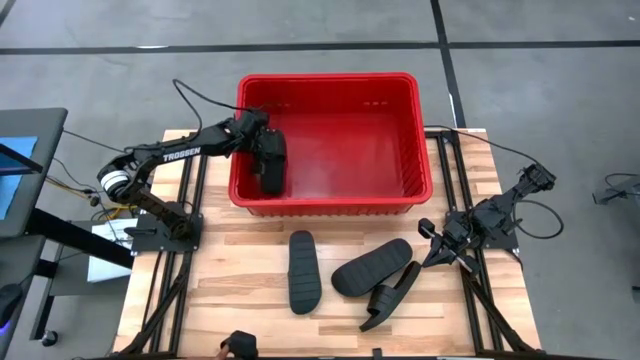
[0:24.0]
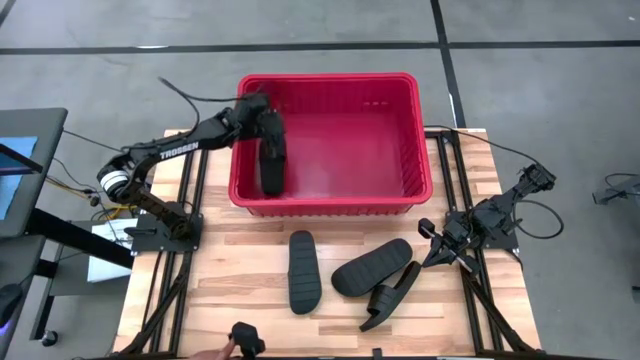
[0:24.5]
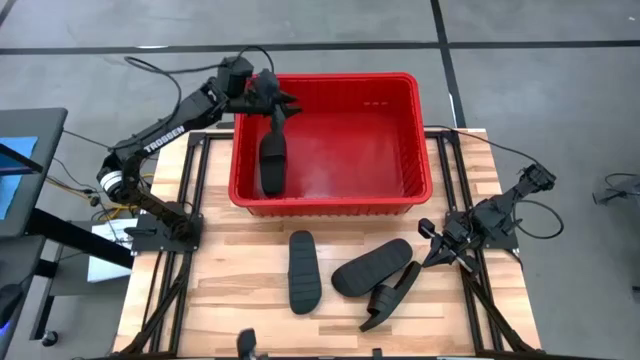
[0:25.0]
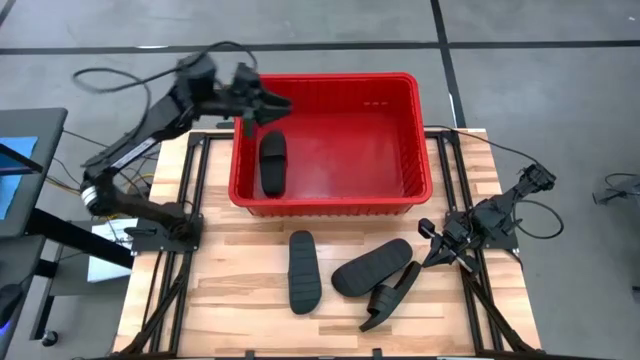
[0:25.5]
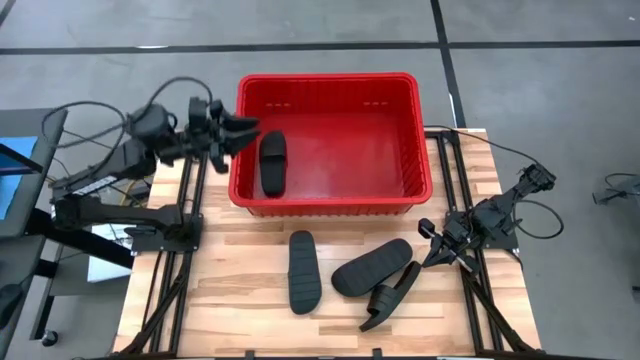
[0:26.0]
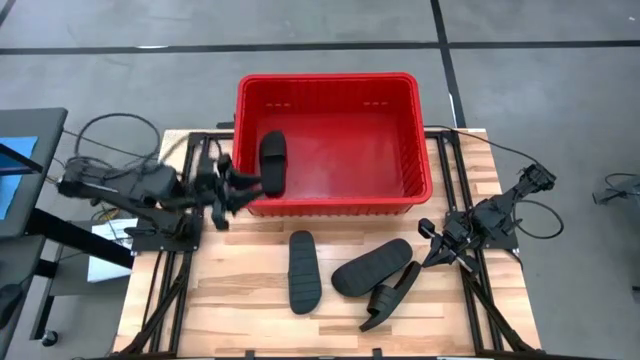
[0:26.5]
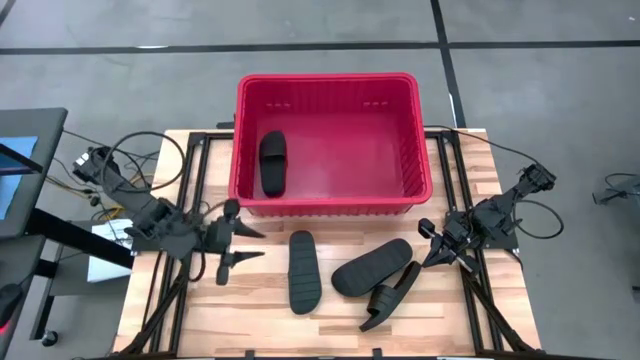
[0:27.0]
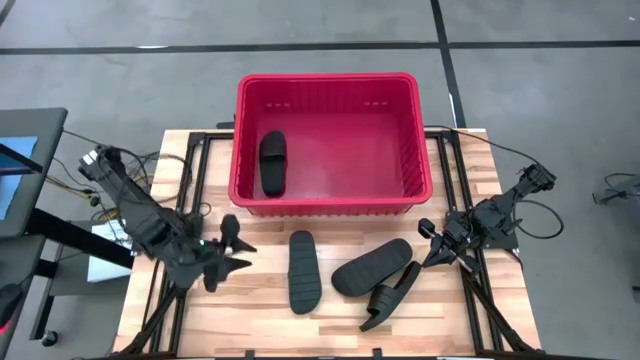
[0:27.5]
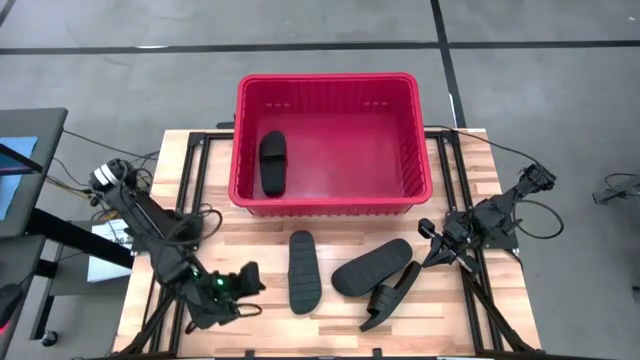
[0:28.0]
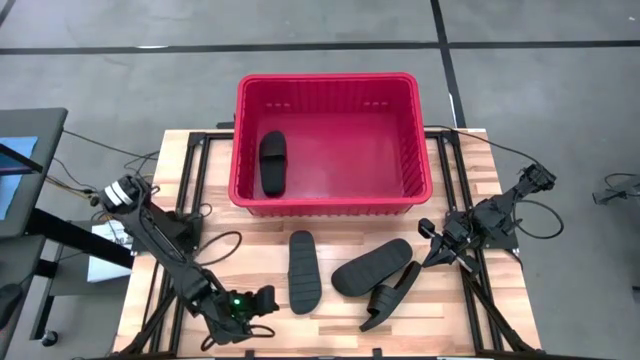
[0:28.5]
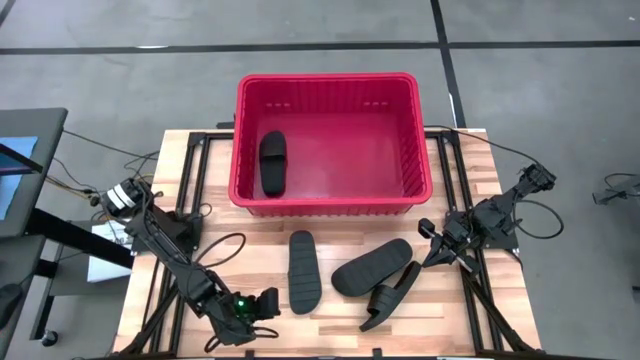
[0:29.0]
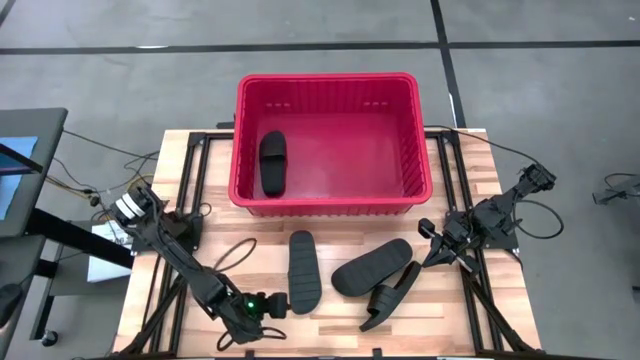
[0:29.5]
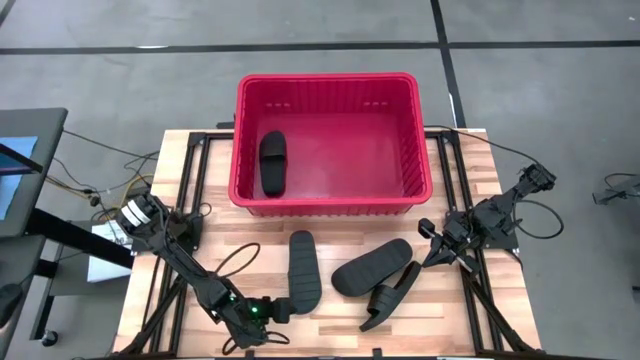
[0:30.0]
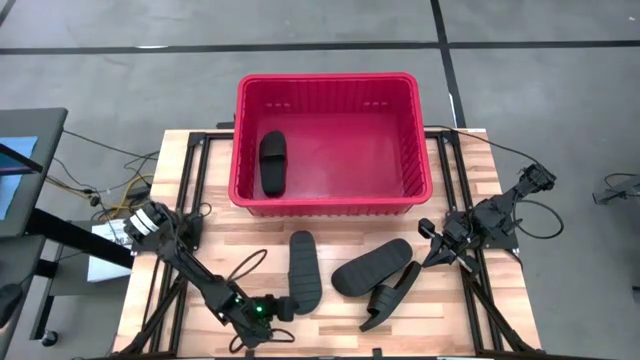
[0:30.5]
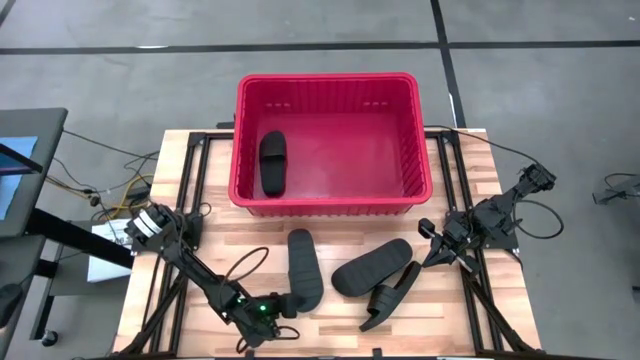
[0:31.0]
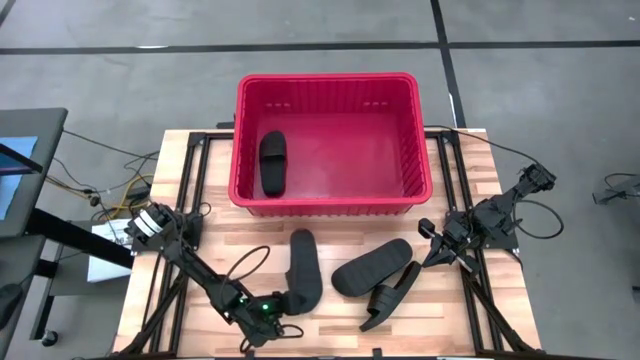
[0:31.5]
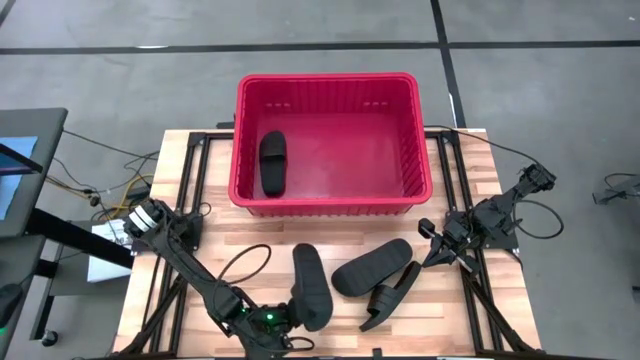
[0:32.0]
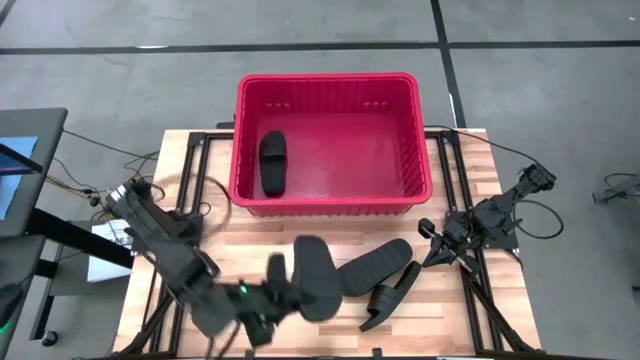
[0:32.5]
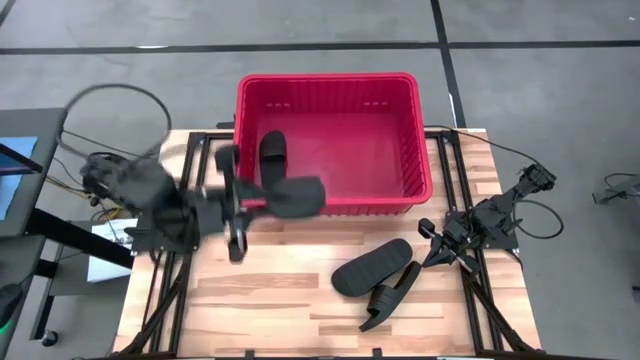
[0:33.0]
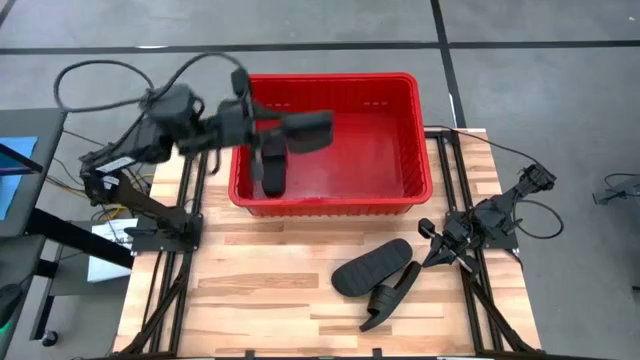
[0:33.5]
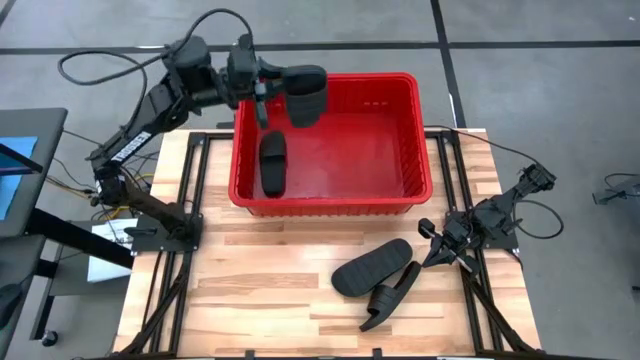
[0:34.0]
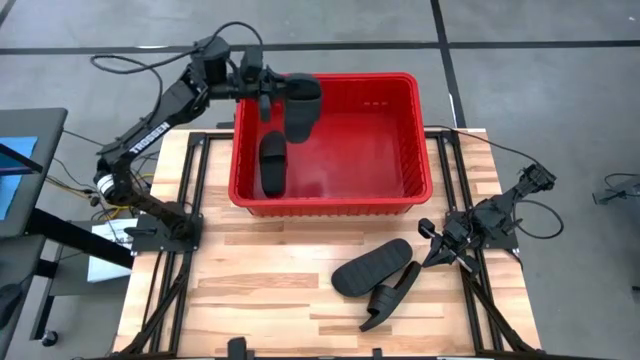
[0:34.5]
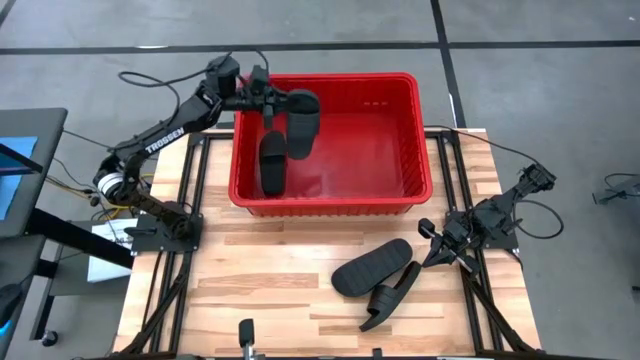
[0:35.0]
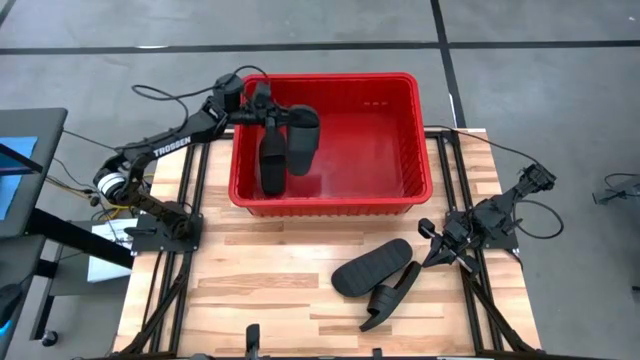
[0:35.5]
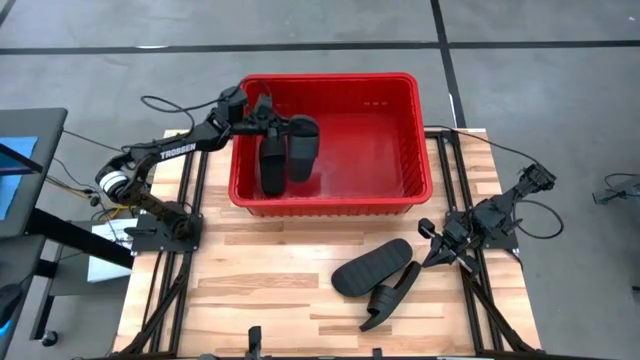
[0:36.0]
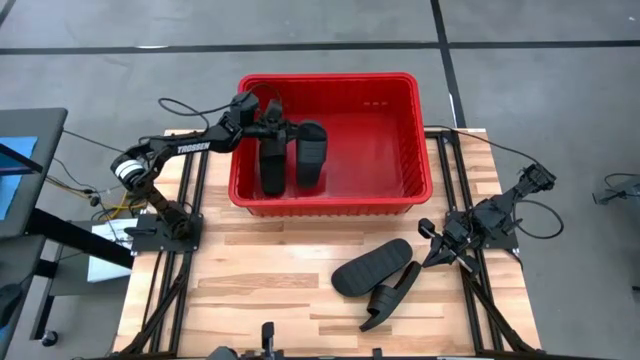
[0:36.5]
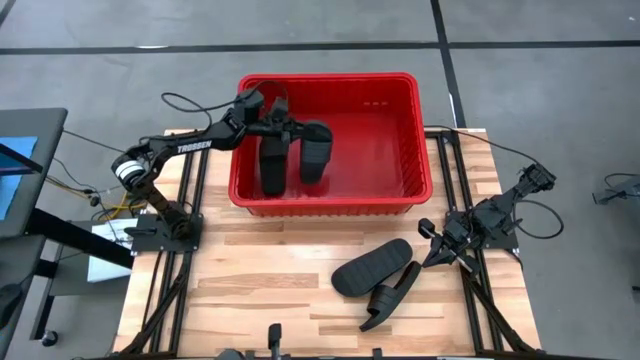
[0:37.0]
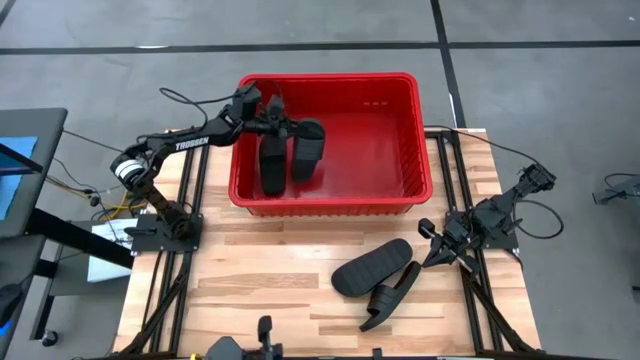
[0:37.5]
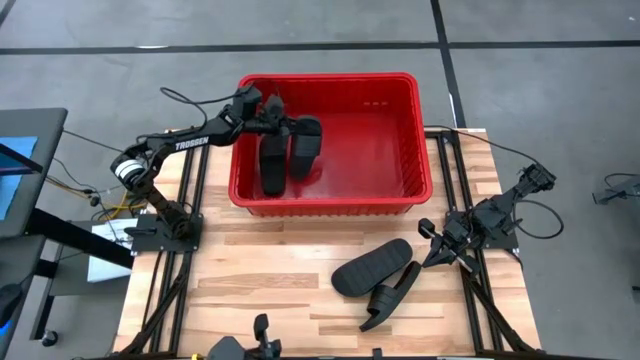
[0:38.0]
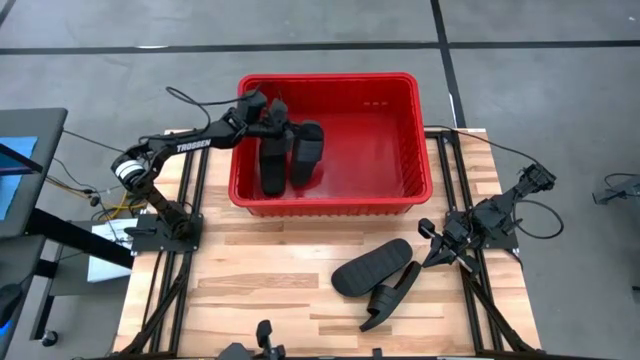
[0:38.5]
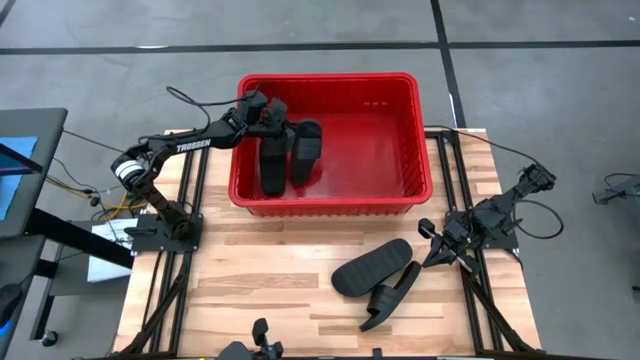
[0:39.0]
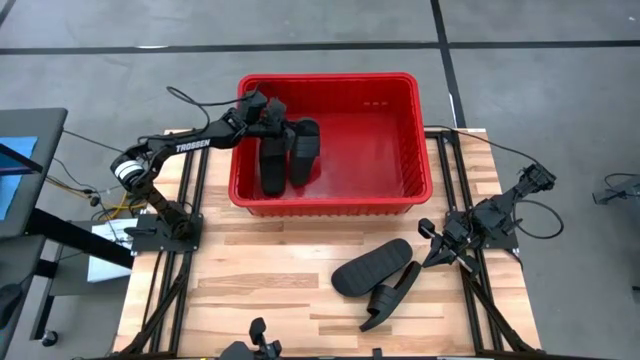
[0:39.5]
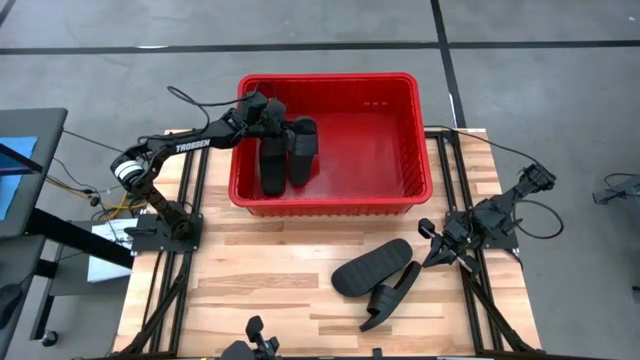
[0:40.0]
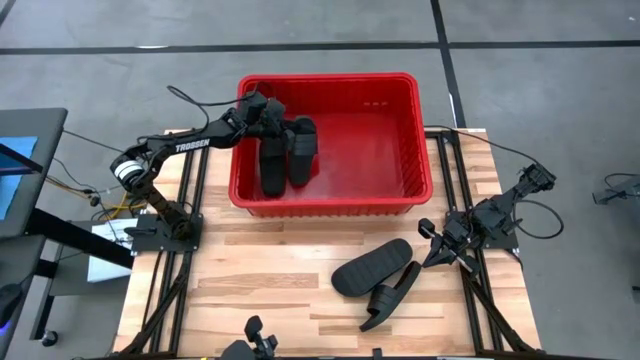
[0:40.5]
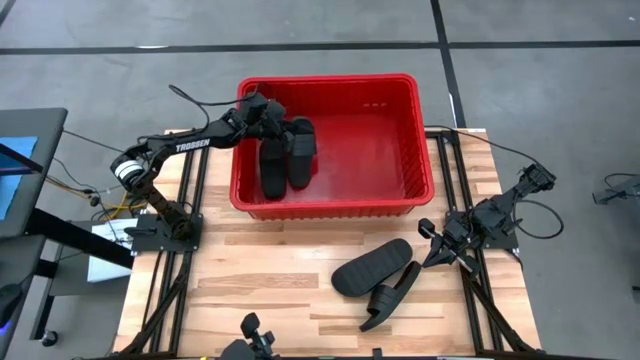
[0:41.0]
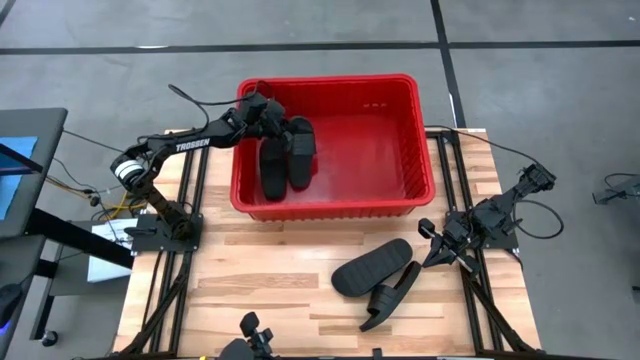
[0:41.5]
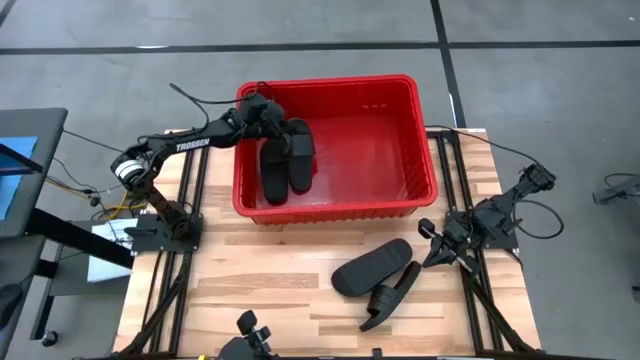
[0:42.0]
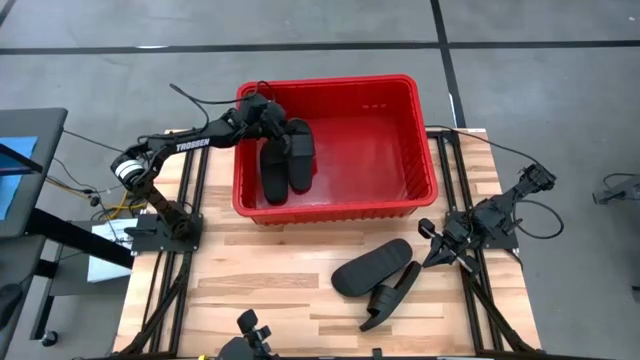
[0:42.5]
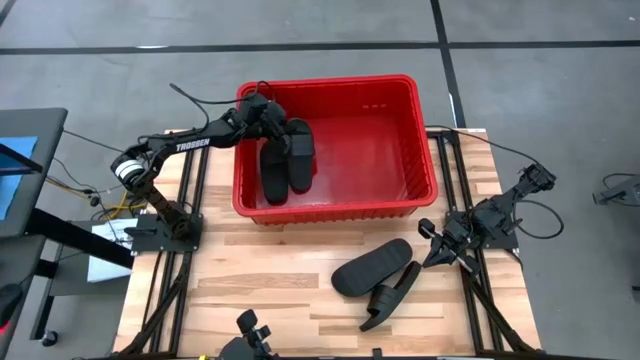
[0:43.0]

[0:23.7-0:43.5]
Task: Pick and place slides into bin
Put the black slides into the red bin
